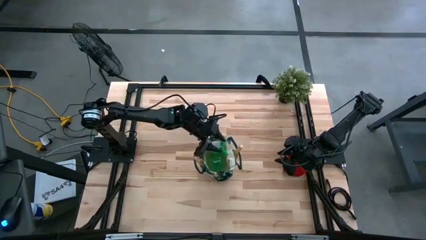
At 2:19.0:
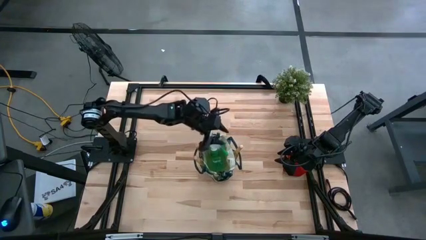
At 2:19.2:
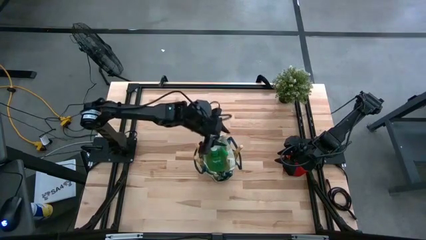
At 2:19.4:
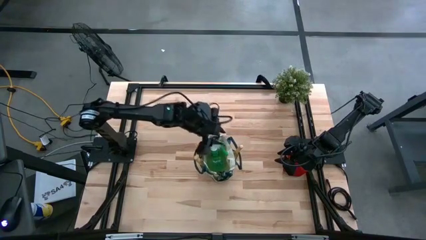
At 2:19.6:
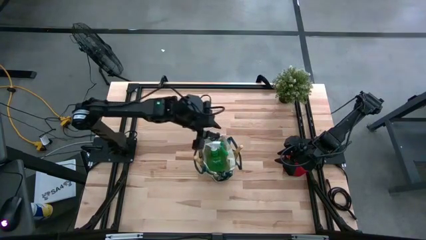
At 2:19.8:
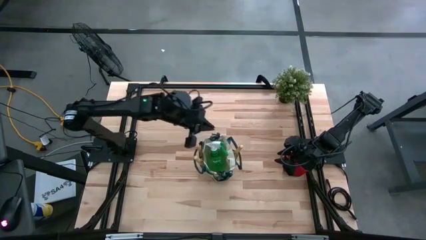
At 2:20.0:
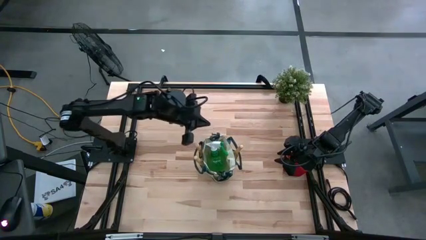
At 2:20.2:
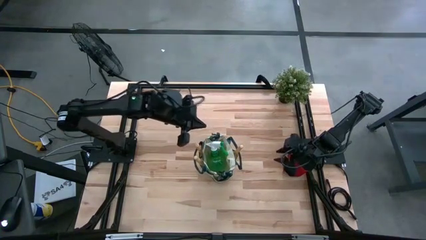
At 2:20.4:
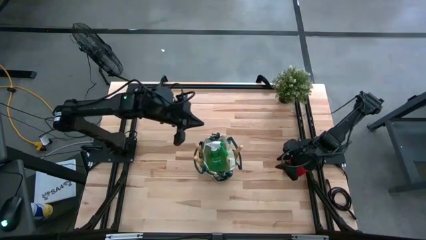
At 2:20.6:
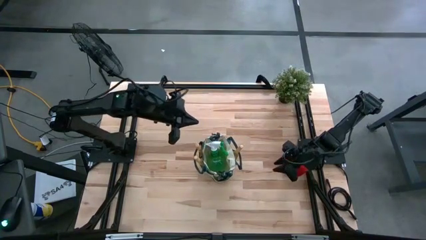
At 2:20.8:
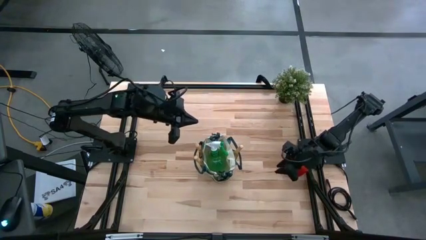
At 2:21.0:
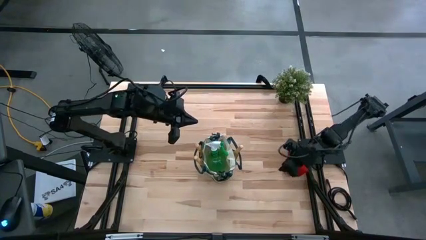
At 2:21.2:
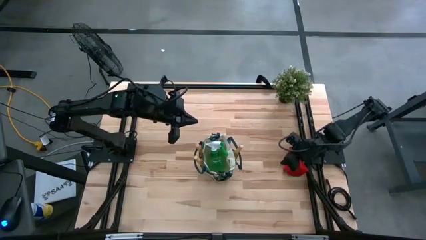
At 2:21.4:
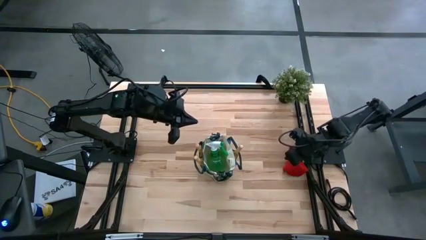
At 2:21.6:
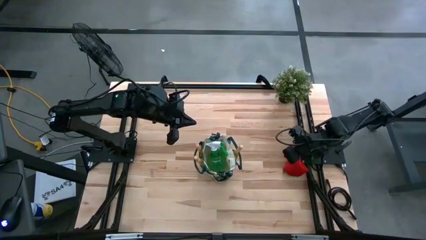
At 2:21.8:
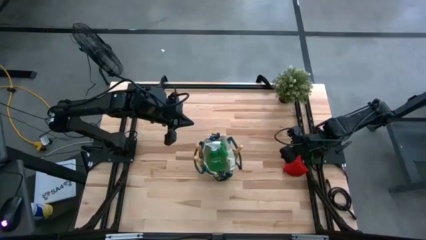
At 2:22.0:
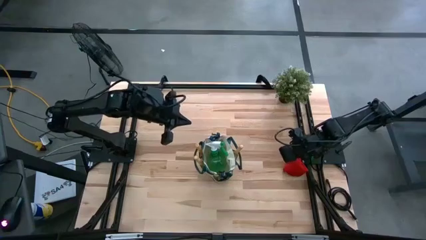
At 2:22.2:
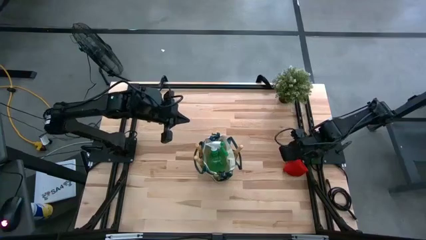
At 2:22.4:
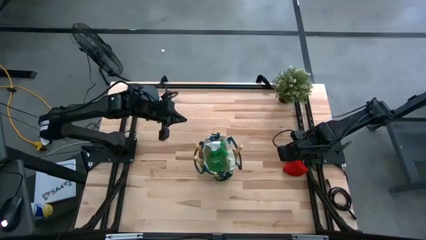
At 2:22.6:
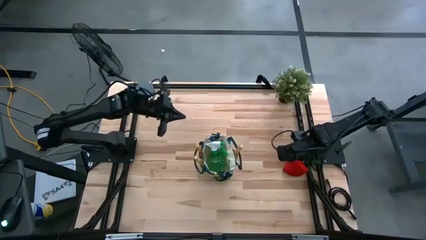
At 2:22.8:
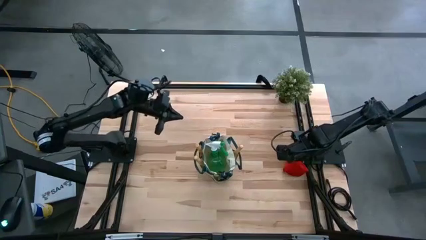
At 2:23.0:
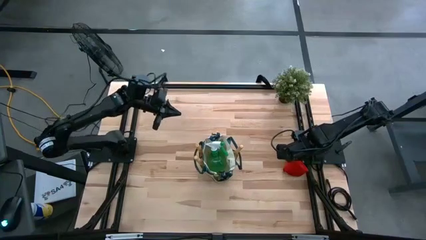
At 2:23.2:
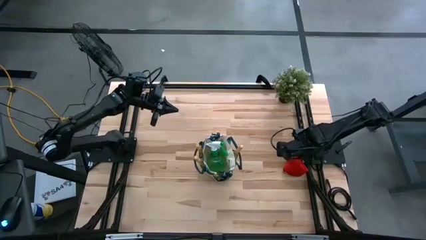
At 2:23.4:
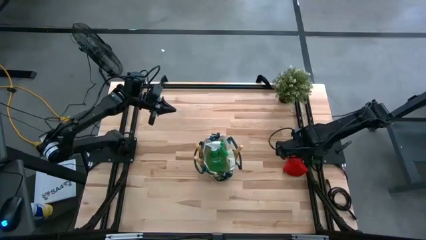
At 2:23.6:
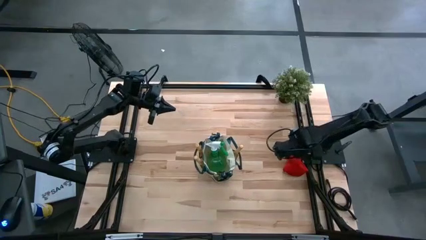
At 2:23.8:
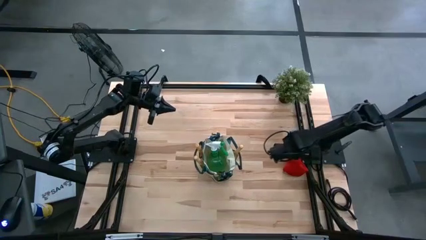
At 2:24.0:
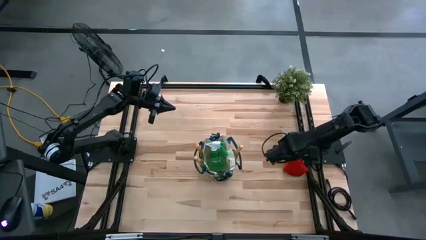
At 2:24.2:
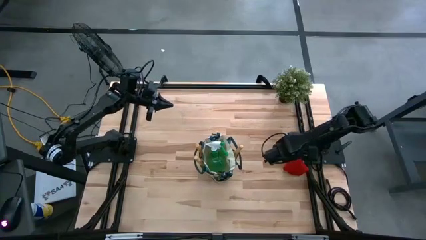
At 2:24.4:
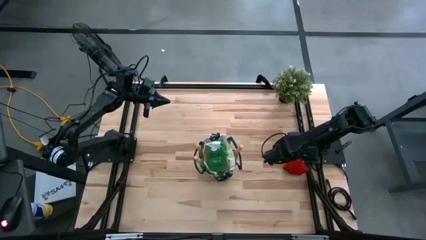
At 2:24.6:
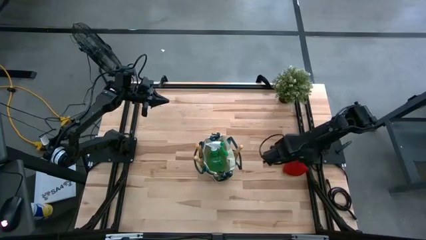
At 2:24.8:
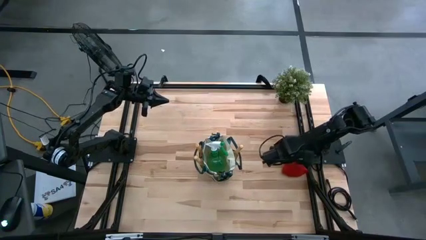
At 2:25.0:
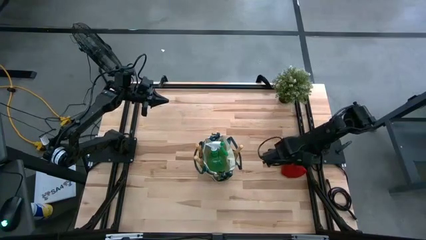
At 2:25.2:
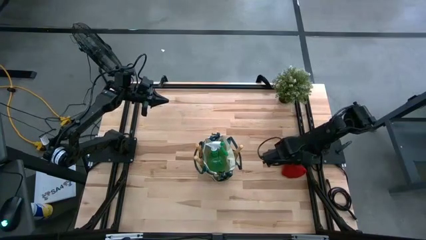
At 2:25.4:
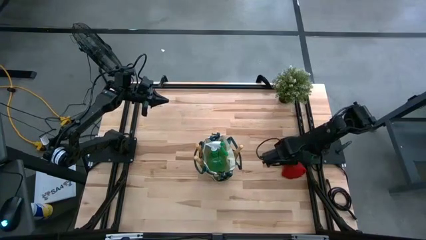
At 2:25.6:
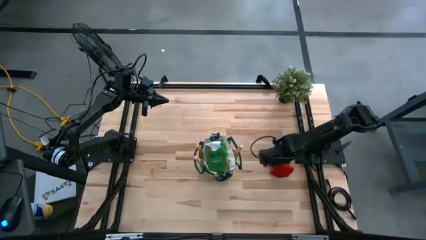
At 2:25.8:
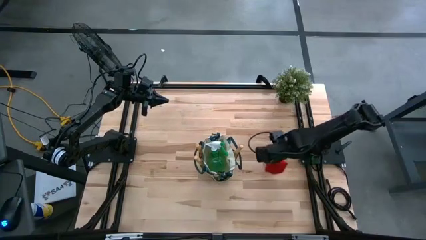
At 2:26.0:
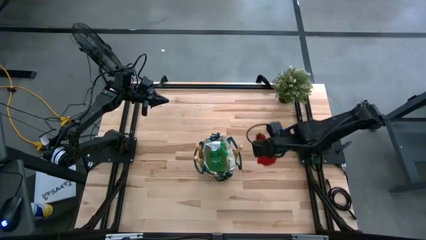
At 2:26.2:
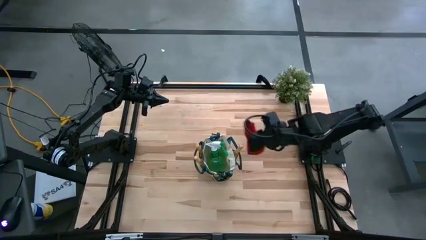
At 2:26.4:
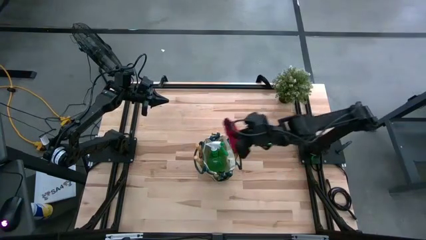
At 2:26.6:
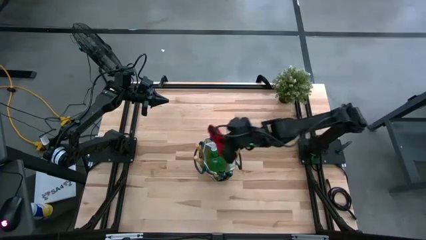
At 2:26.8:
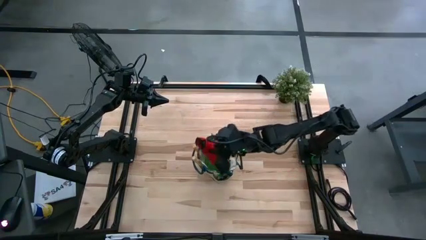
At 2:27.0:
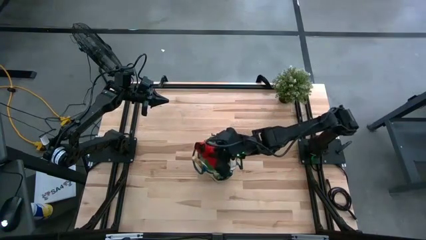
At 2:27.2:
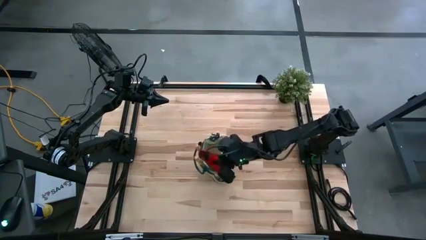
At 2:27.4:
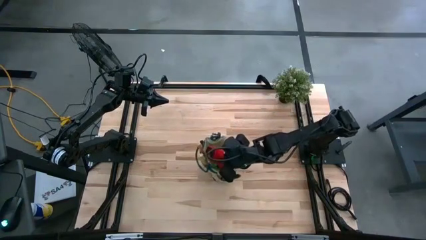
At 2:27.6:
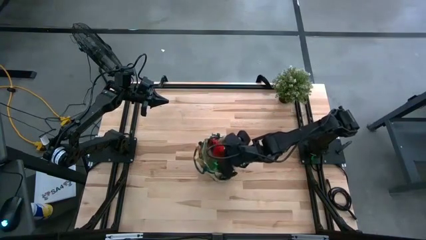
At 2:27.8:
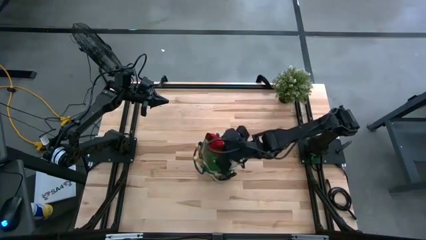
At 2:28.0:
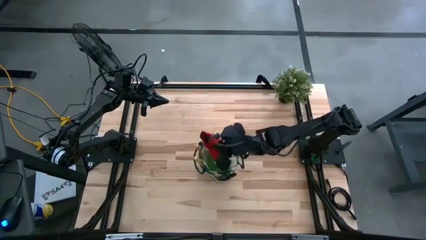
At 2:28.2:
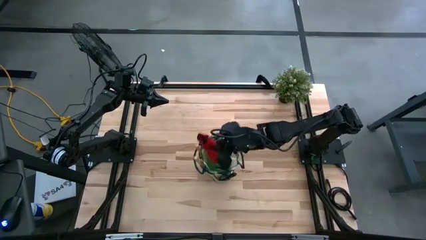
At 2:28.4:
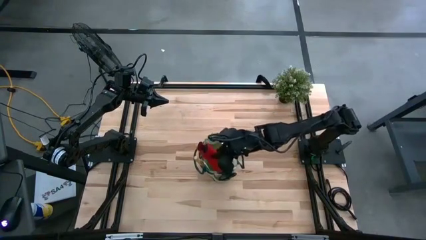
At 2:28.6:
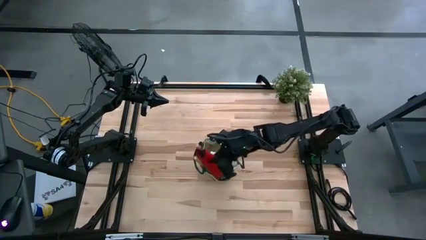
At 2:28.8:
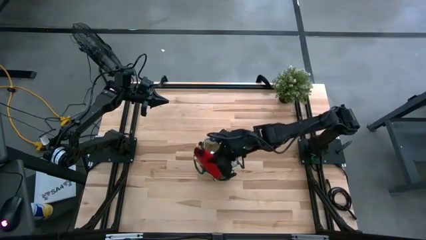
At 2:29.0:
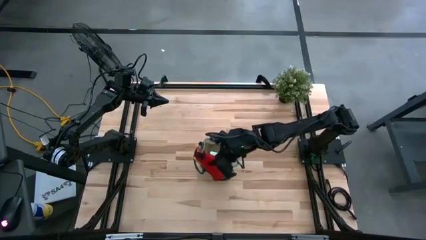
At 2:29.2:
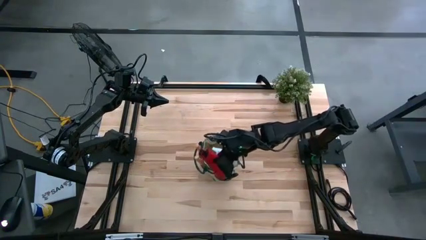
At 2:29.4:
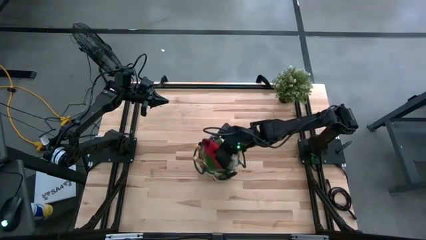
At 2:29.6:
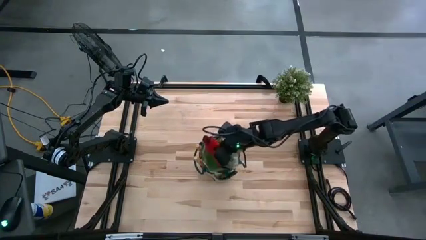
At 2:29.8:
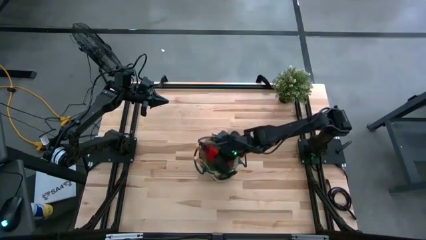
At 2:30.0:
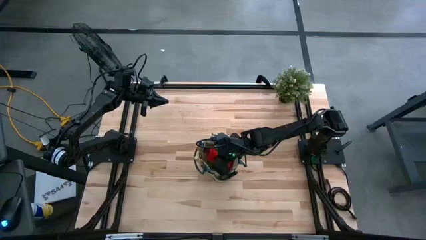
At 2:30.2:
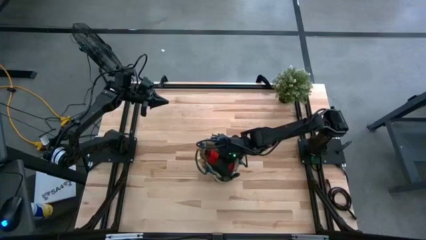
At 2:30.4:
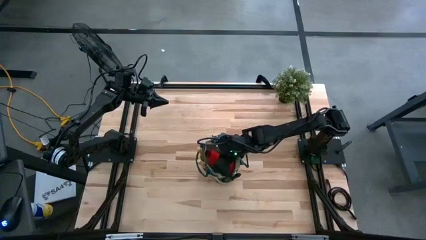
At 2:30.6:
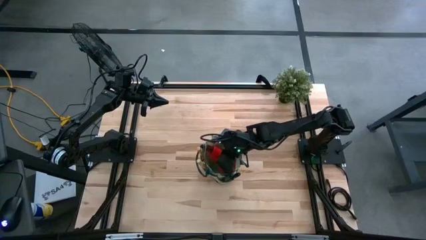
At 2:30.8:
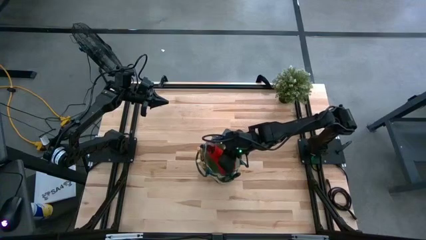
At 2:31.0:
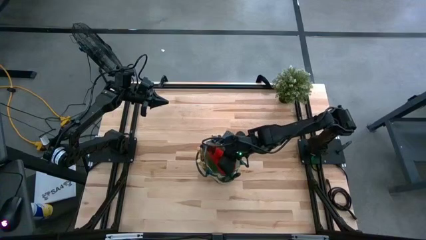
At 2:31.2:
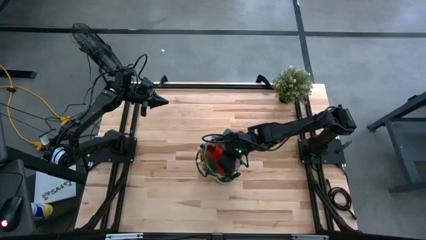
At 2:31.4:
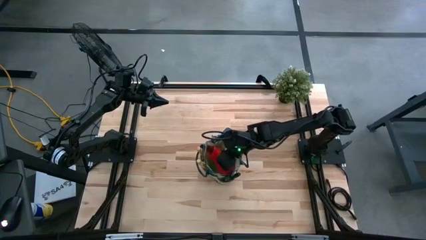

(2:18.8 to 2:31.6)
Task: Pick & Place Garden tools in Gardening bag
Put the red gloves into the white gardening bag

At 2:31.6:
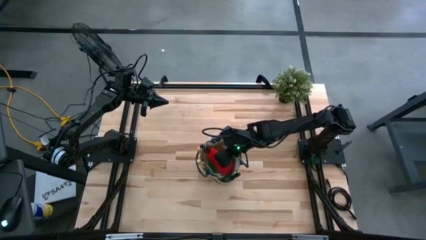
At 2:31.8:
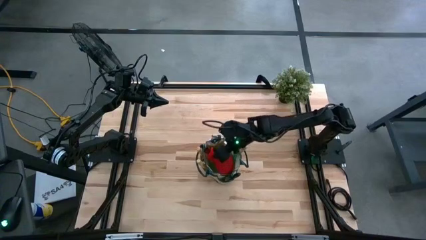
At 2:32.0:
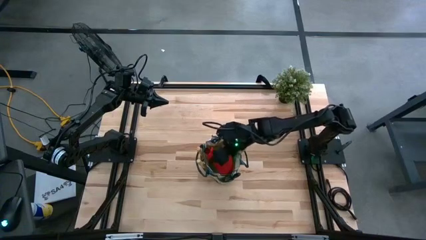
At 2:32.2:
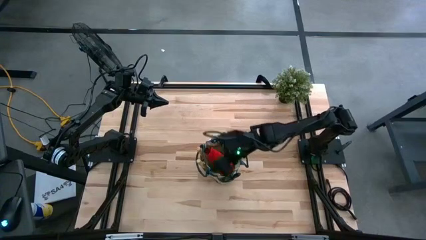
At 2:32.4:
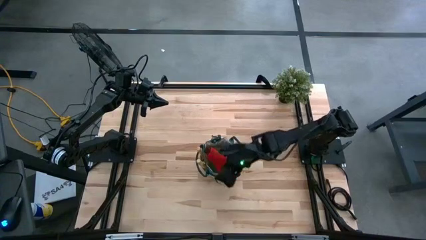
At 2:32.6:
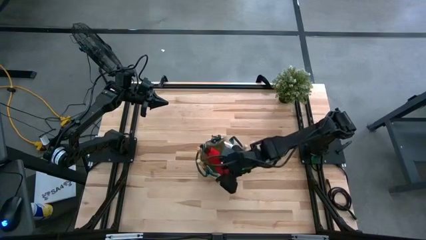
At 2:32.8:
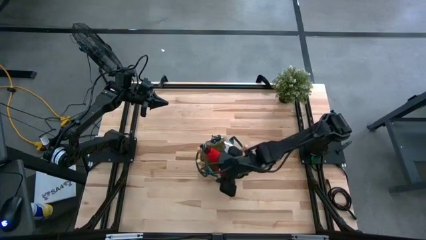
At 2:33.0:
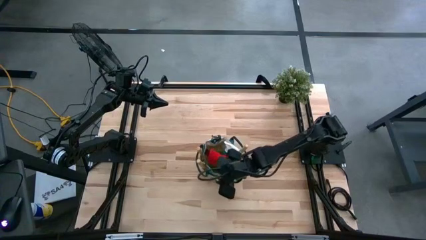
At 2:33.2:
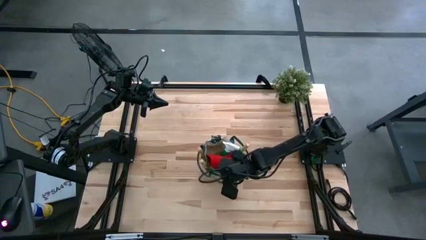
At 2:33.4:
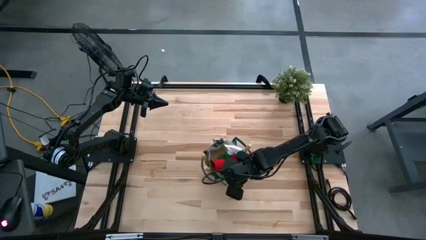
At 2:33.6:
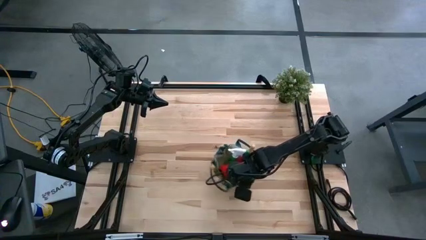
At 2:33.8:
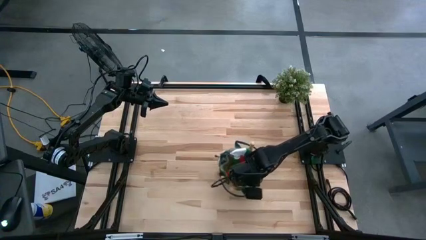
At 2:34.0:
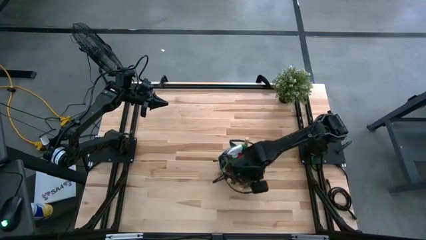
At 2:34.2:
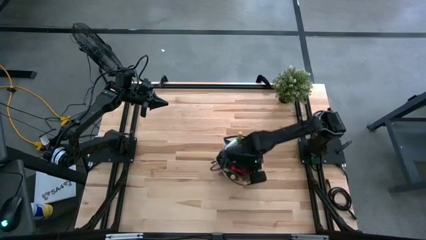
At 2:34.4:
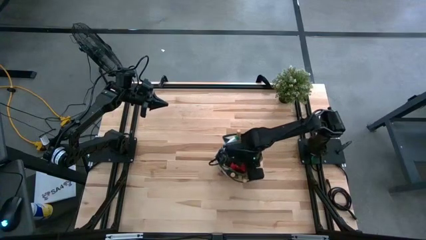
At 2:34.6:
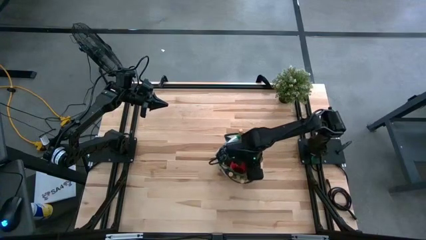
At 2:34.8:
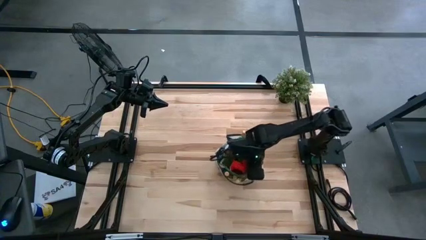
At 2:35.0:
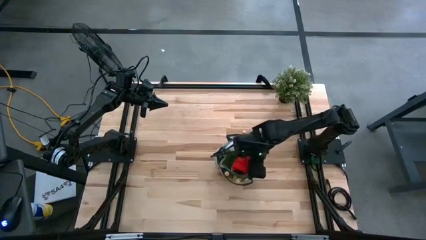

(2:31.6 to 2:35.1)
Adjust the white gardening bag on the table
